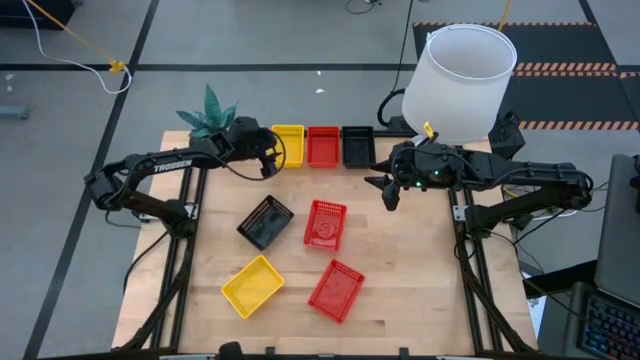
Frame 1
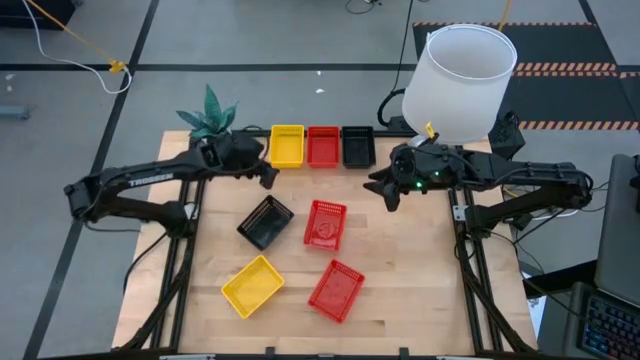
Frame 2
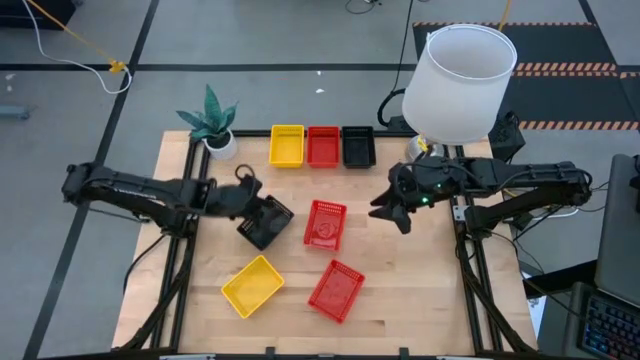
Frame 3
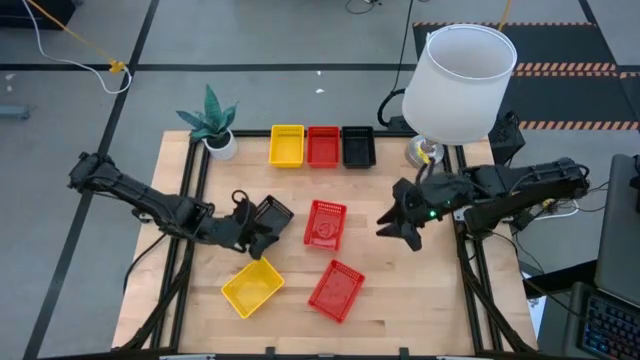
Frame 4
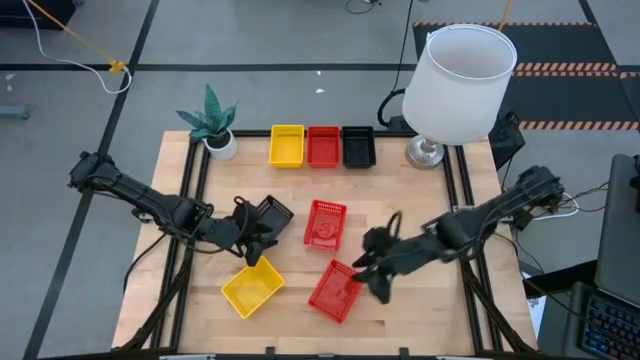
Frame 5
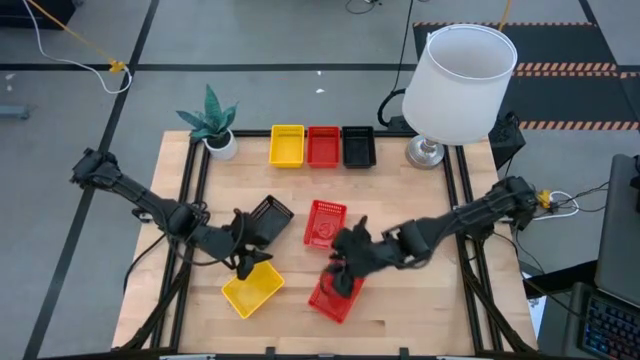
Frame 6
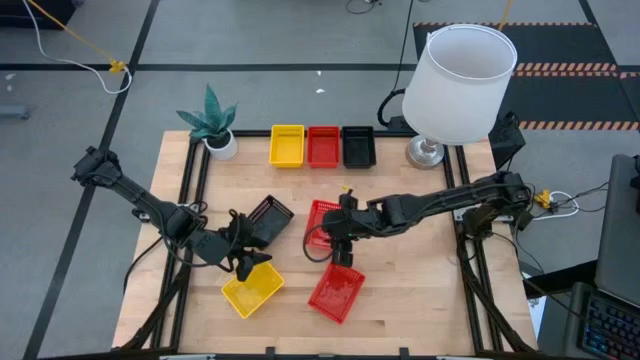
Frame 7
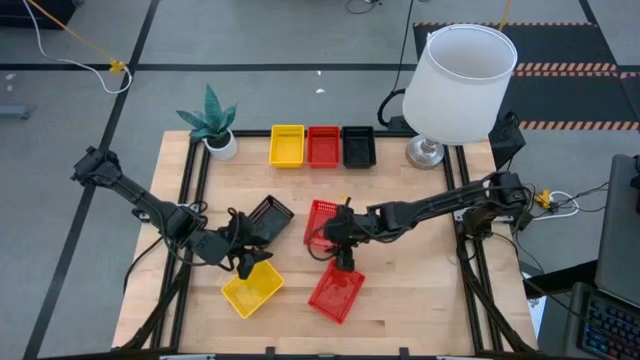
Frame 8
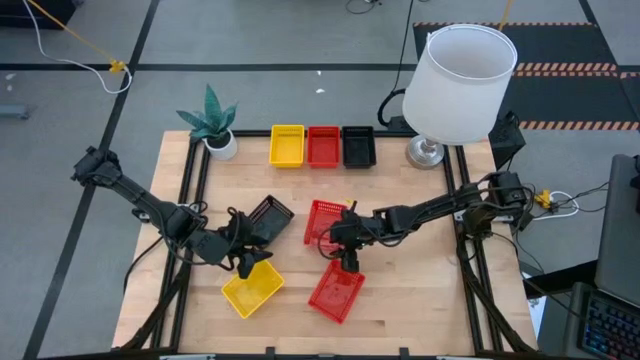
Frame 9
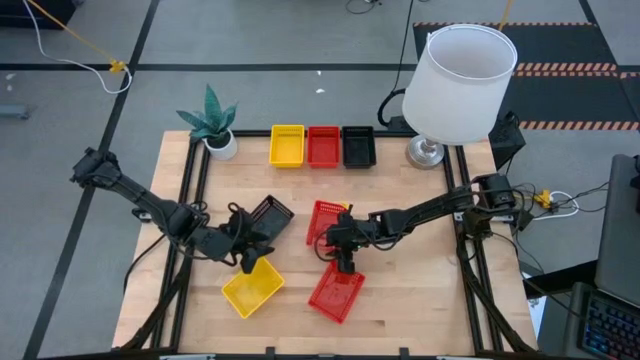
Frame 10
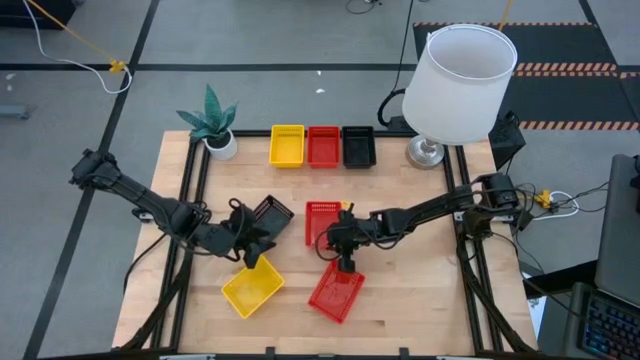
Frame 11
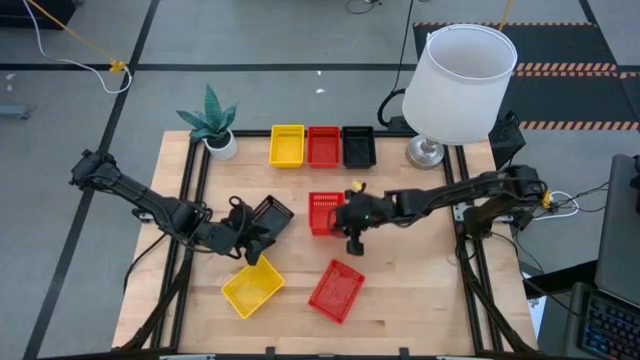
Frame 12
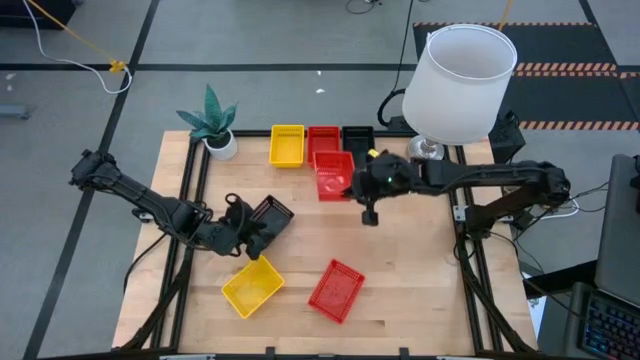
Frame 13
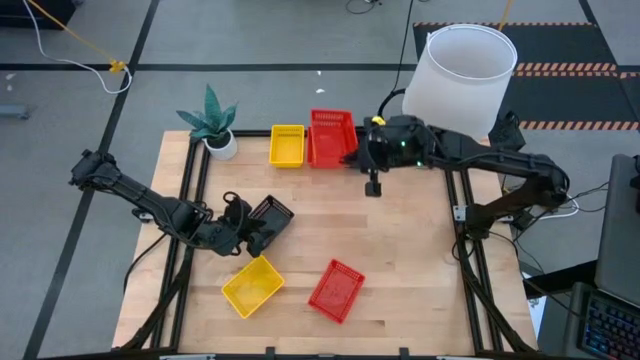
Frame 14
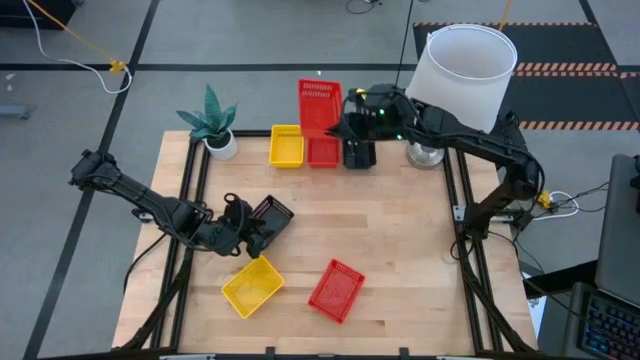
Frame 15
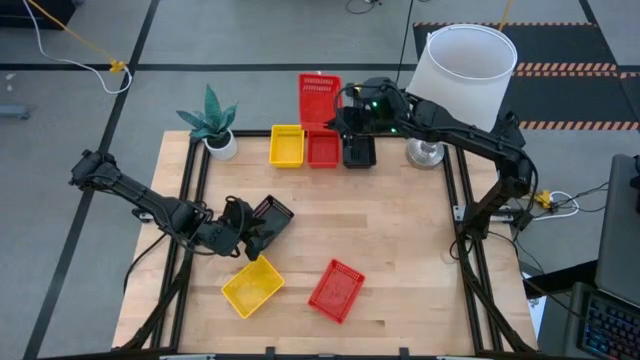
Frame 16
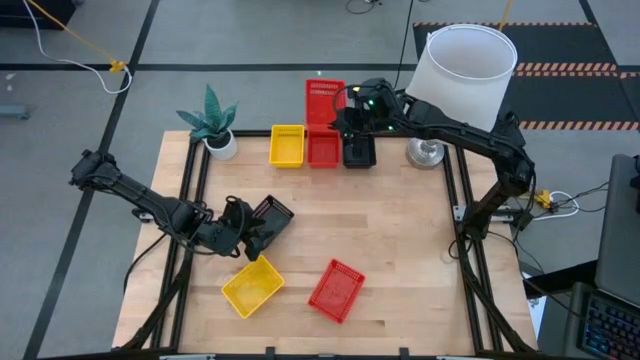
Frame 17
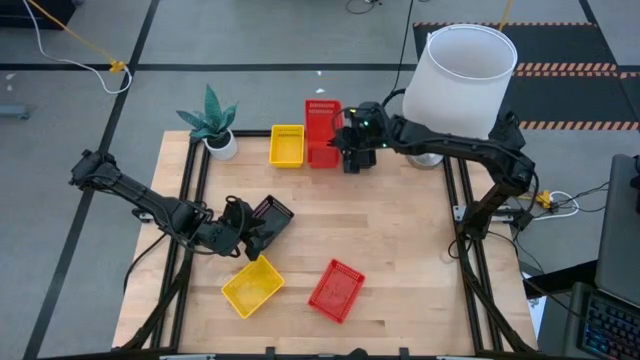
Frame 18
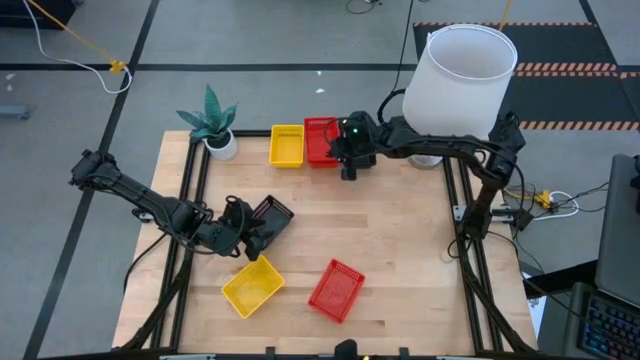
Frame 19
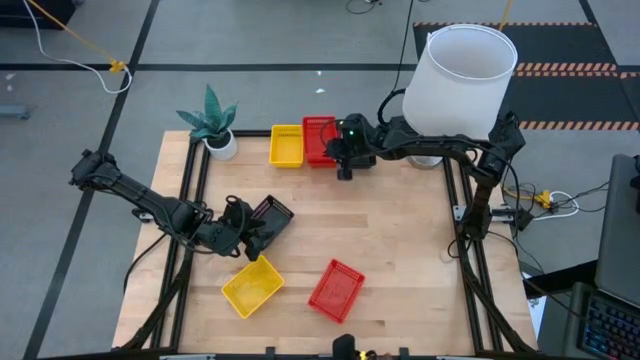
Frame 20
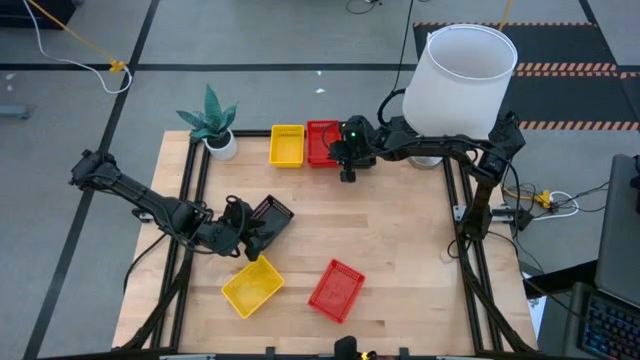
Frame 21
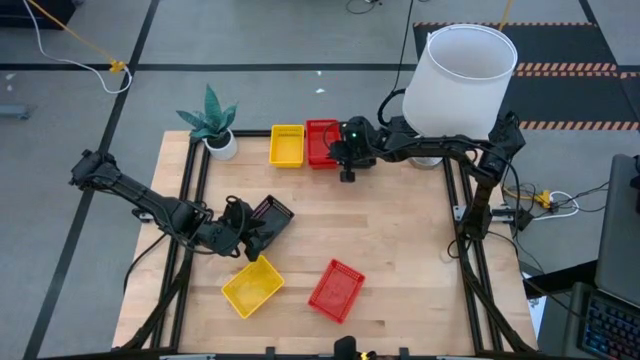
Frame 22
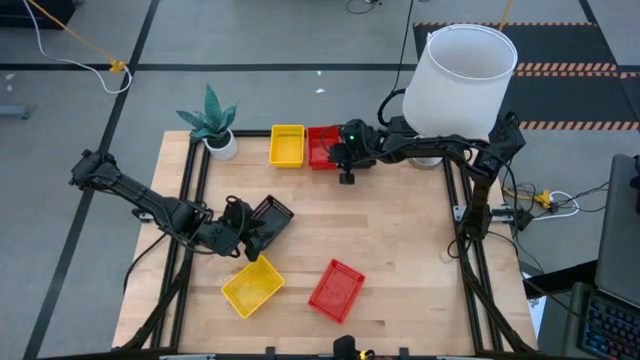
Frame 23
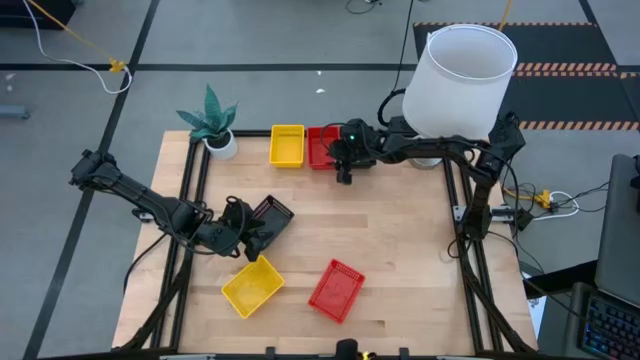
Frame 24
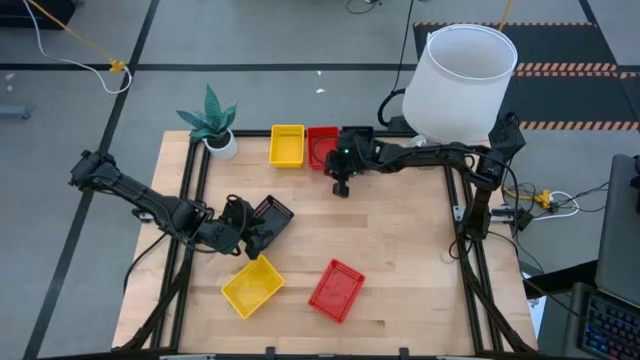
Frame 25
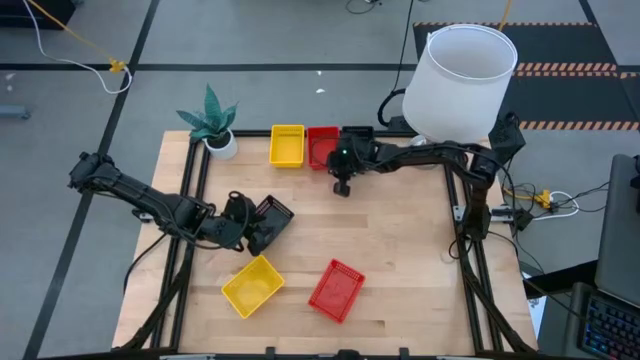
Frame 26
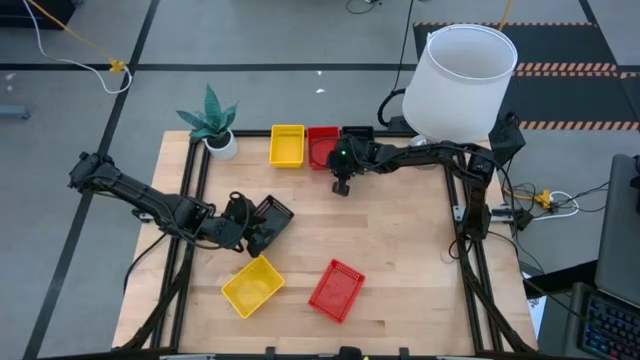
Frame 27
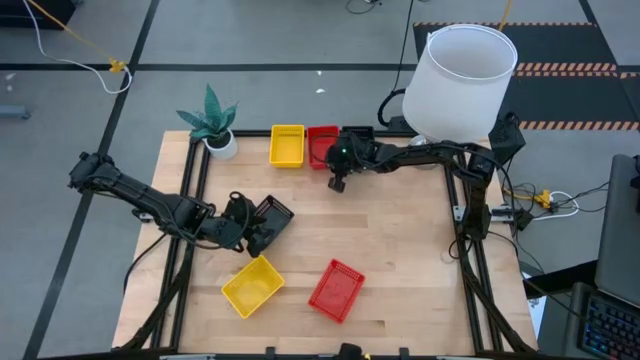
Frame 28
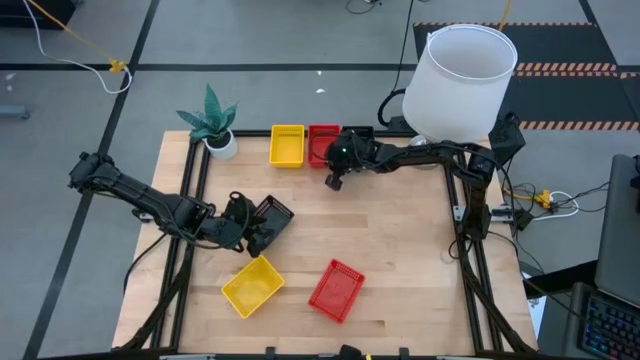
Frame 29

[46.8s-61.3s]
Stack the middle red basket on the top red basket
